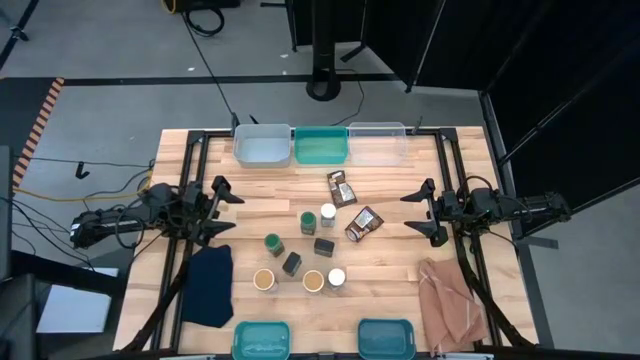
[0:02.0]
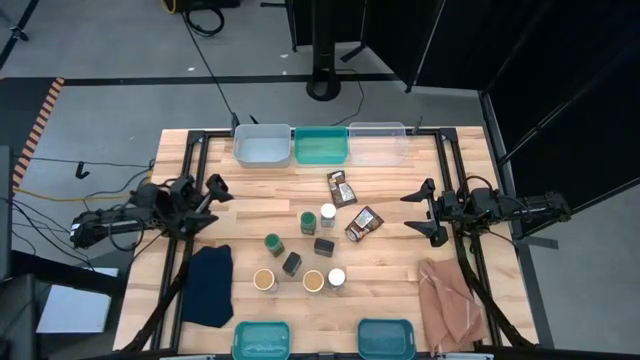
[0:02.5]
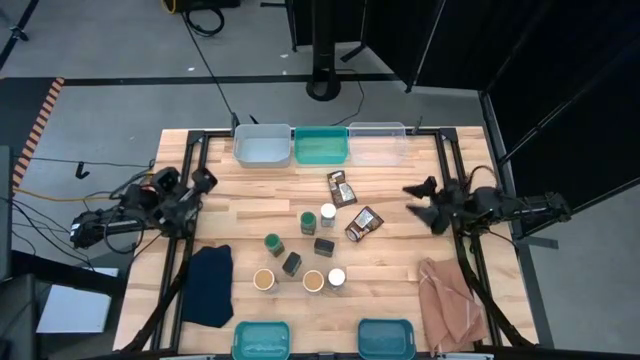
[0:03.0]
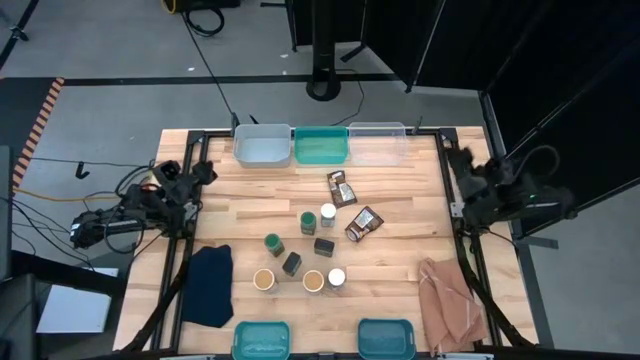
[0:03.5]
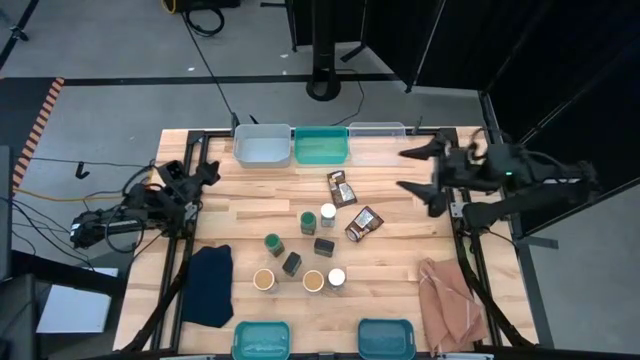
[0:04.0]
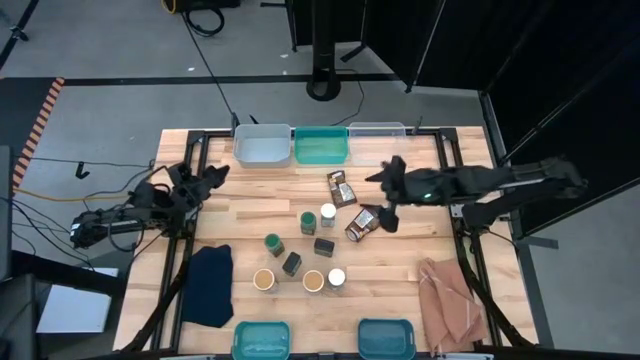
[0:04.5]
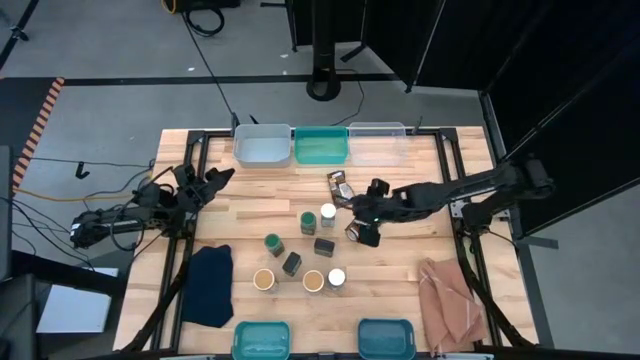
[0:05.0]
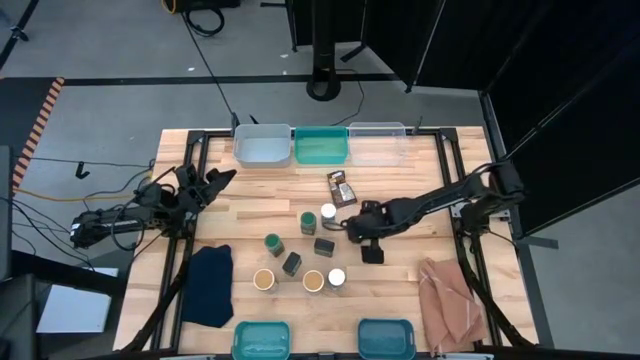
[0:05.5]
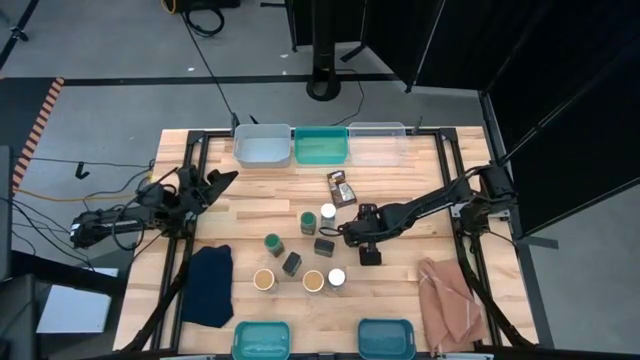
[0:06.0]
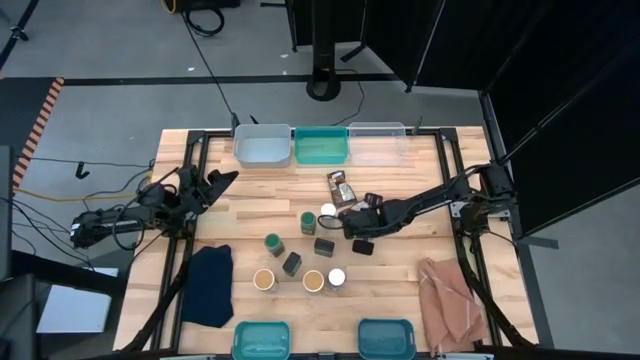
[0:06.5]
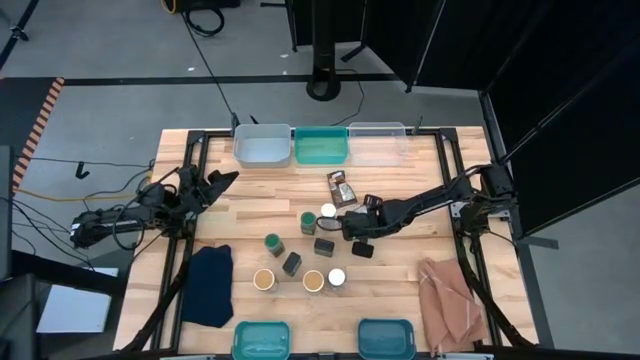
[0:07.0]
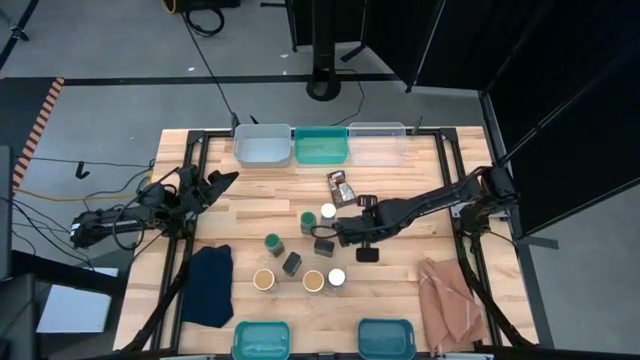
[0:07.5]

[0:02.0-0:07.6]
Task: Sort spices by type
Put the bottom orange seasoning pack into the blue bin

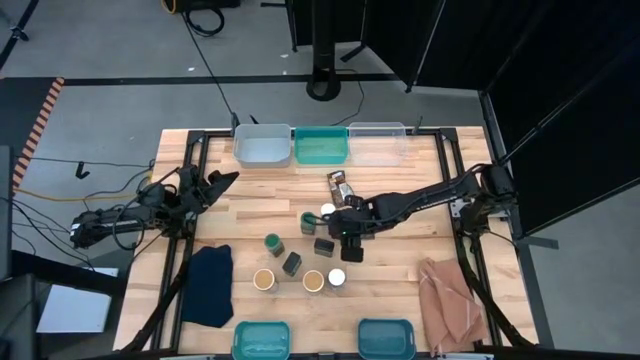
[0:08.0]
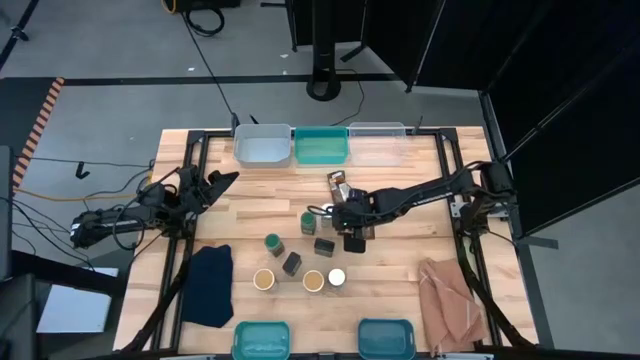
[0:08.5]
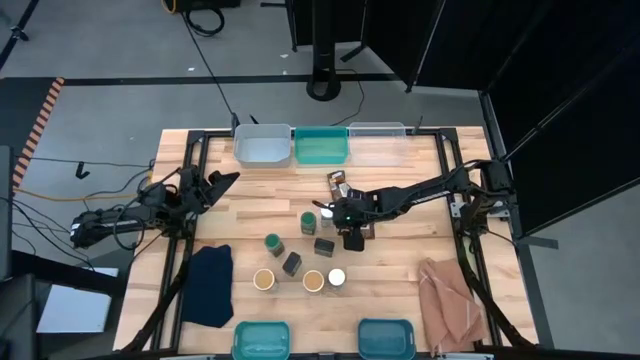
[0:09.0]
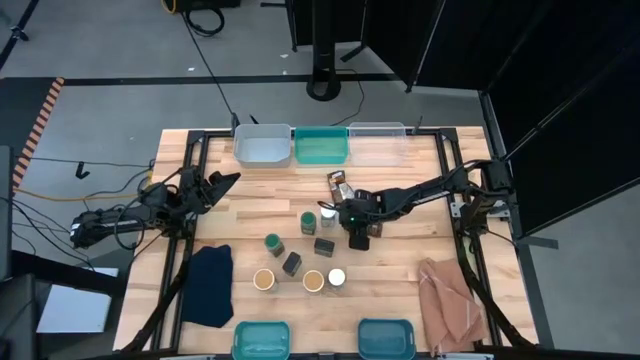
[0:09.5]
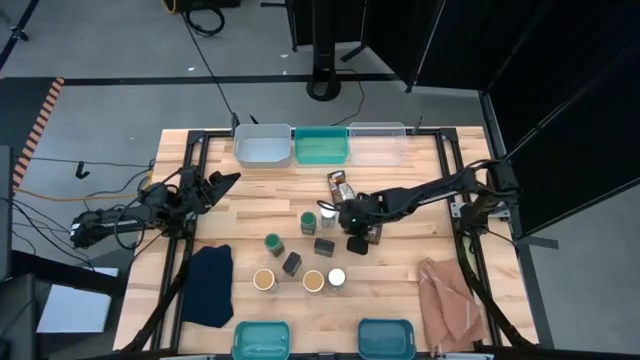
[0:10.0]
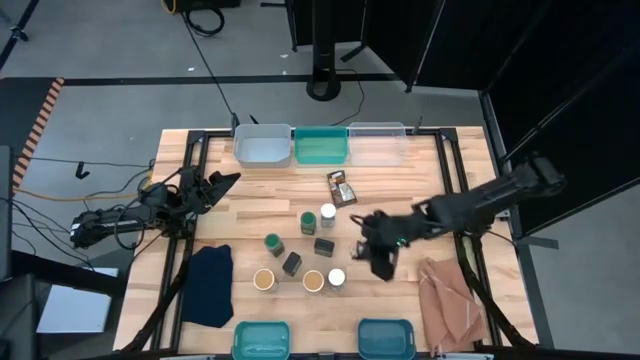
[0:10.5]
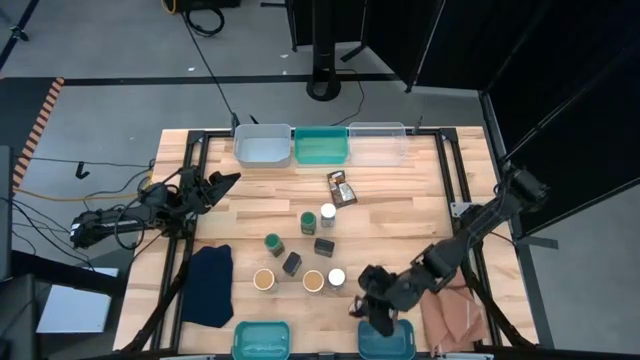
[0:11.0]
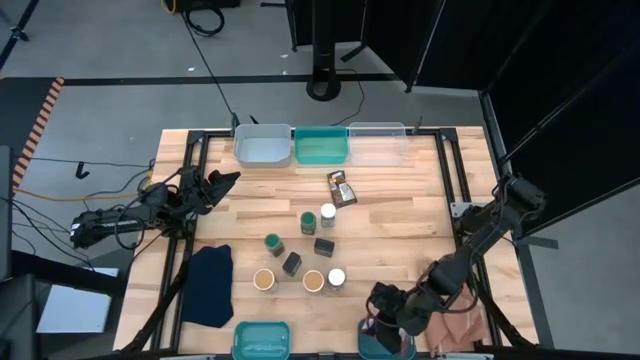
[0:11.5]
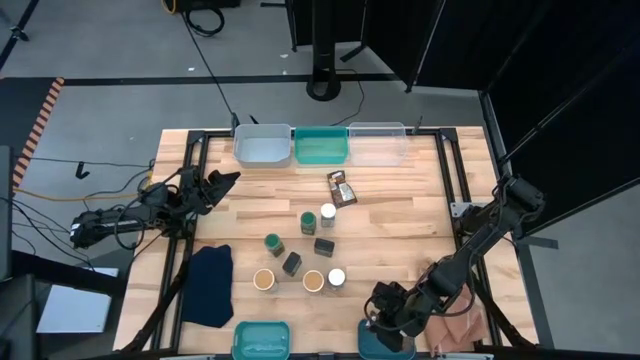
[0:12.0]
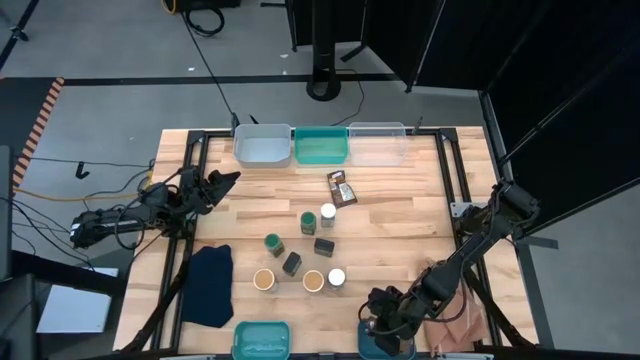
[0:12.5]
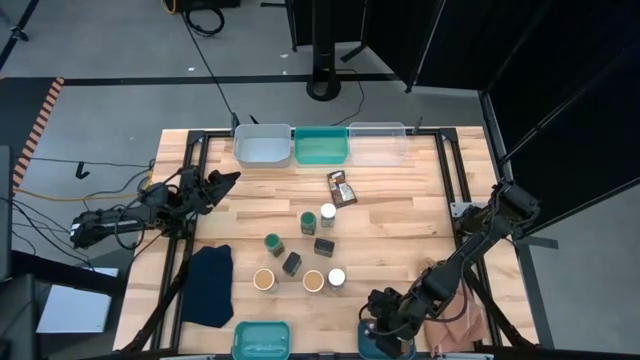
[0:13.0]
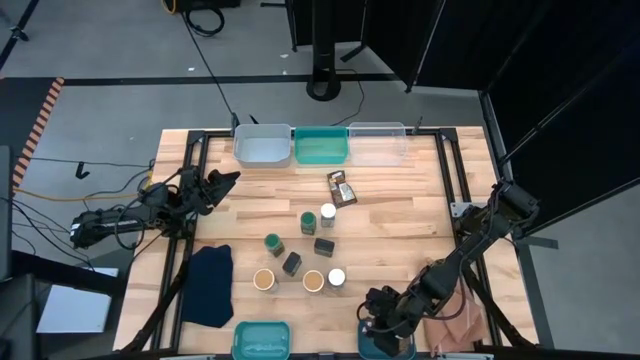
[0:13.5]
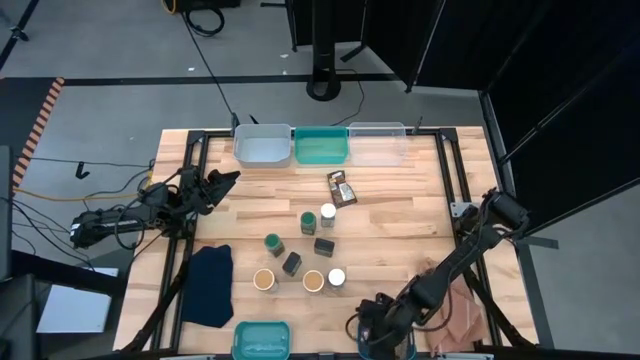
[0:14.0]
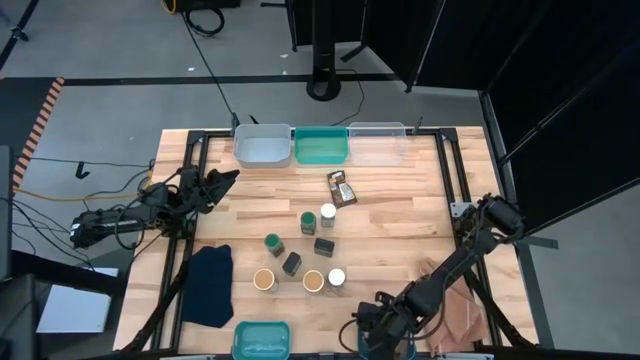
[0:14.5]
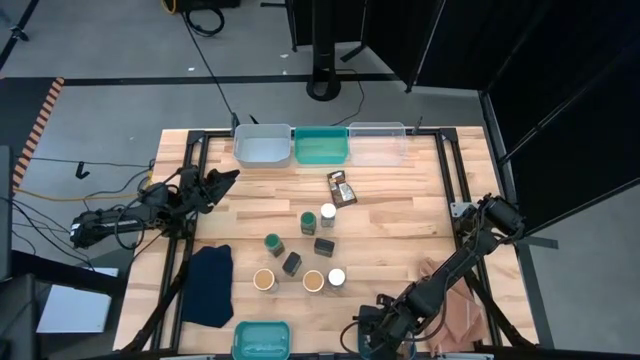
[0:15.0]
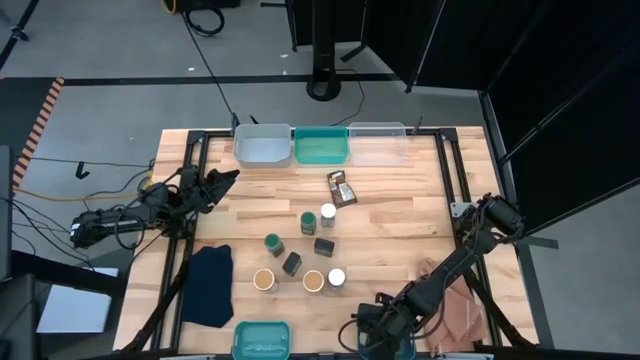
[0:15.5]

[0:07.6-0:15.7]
Put the bottom orange seasoning pack into the blue bin

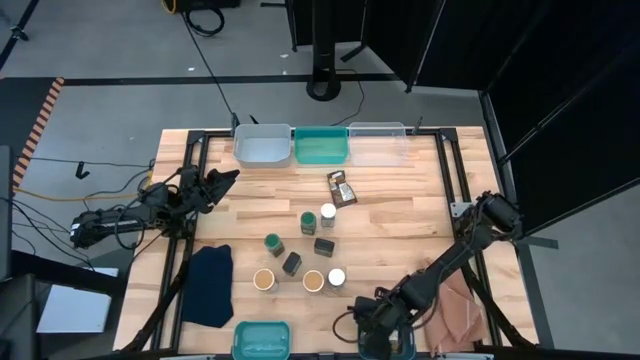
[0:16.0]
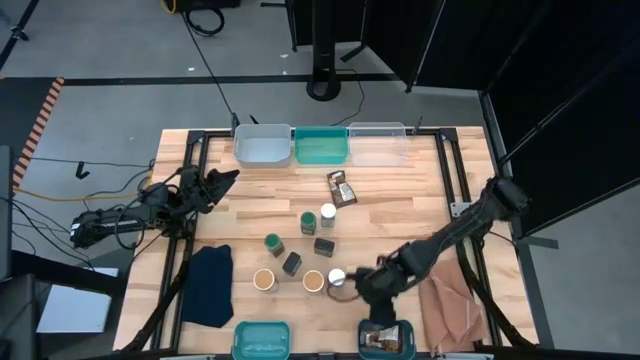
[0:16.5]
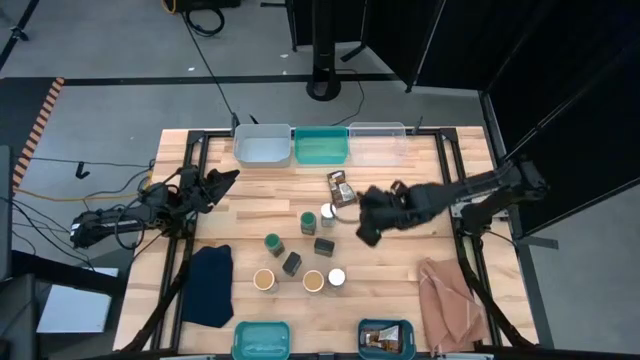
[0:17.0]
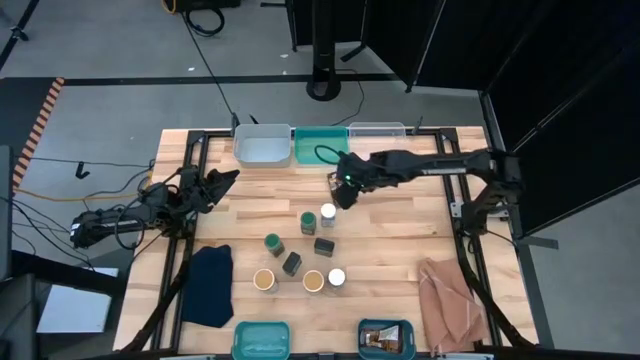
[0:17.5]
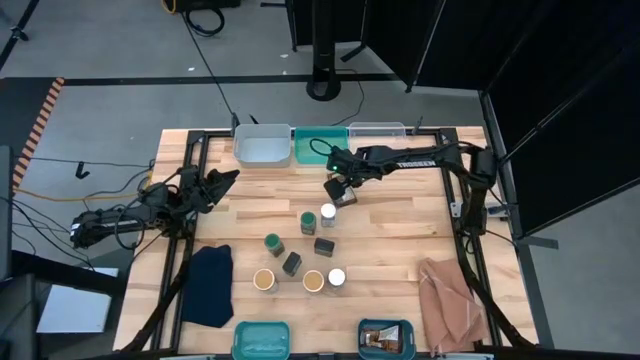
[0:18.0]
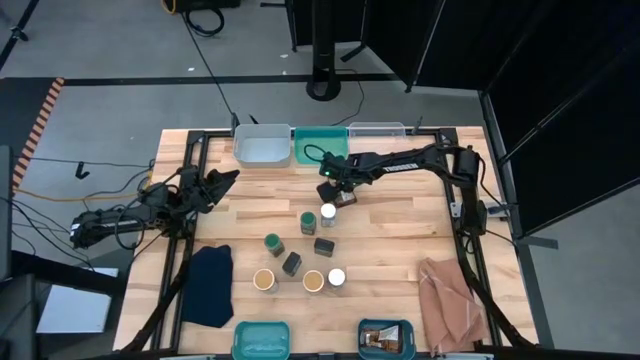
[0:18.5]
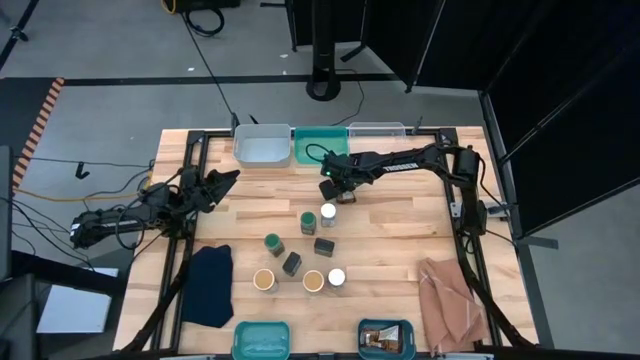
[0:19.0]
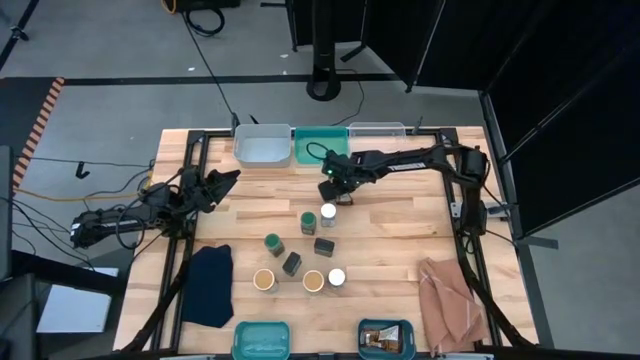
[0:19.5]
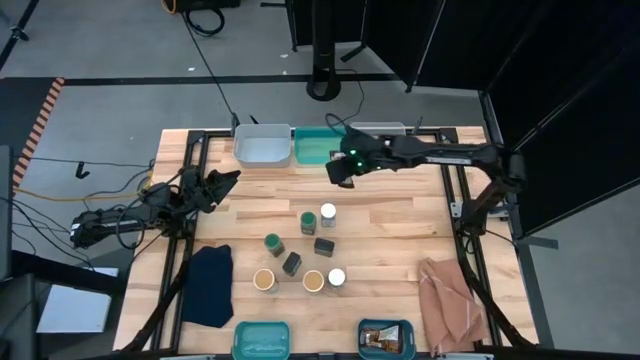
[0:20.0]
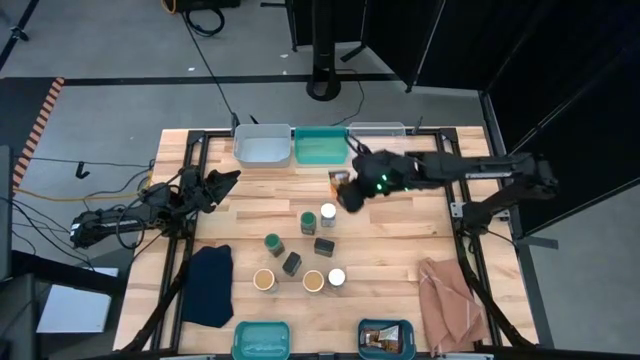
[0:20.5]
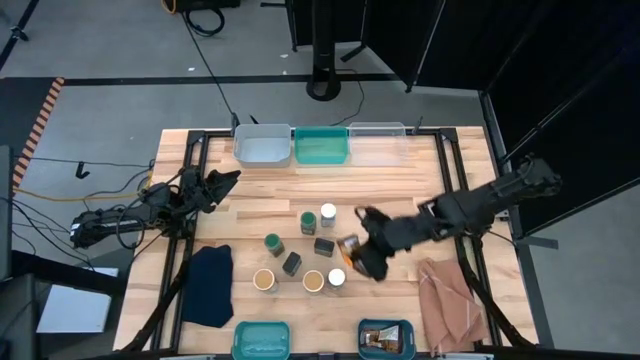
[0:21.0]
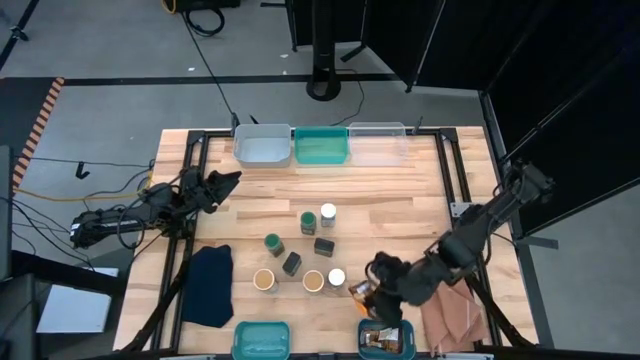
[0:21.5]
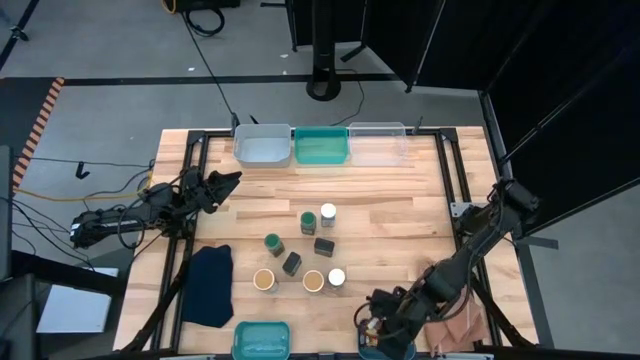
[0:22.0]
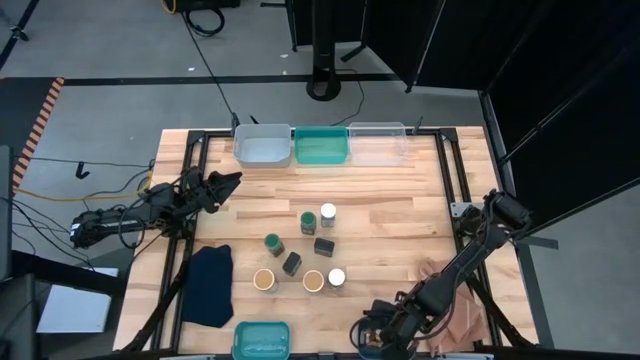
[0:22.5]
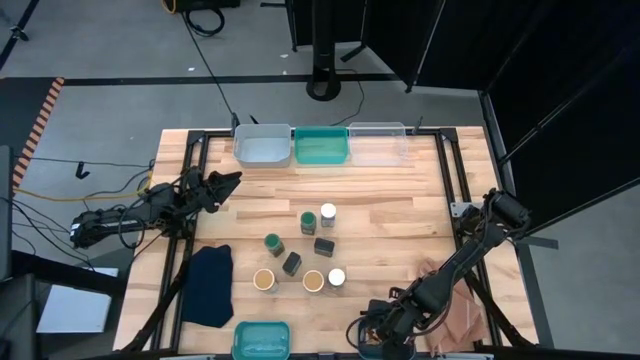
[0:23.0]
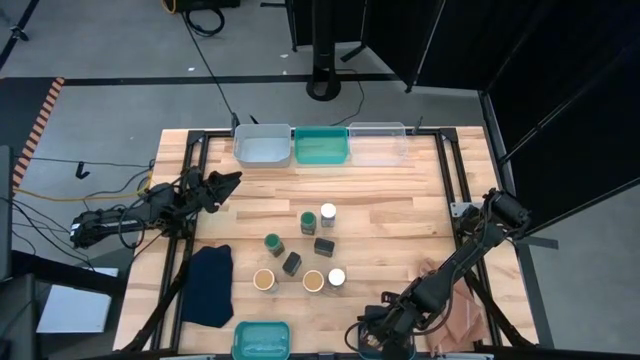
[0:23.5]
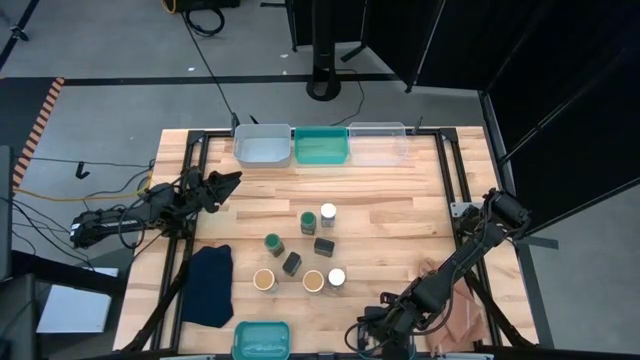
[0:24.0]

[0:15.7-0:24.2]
Put the orange seasoning pack into the blue bin
